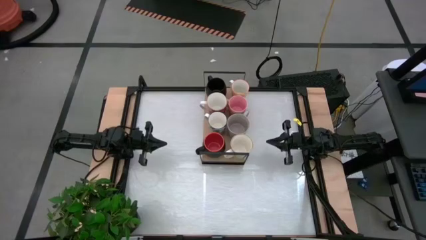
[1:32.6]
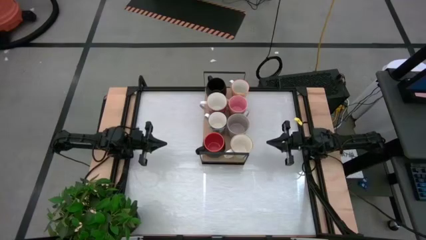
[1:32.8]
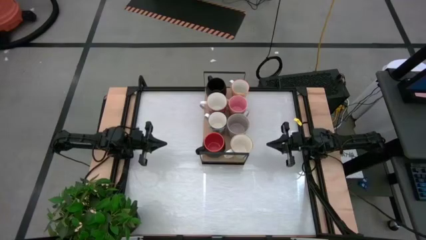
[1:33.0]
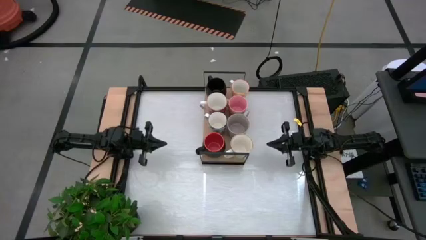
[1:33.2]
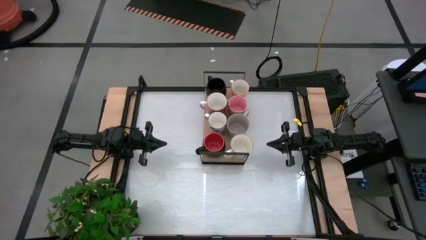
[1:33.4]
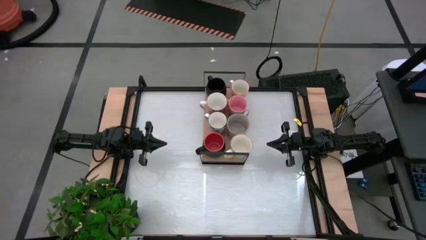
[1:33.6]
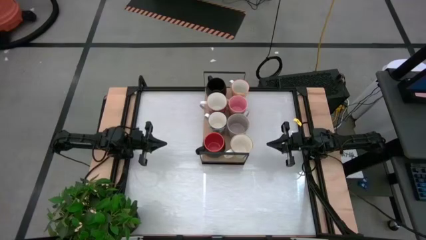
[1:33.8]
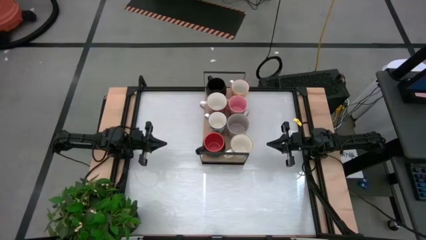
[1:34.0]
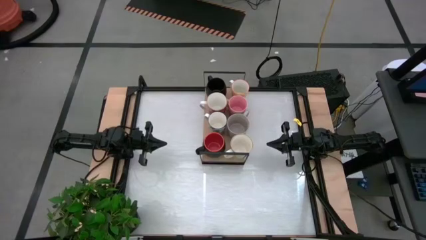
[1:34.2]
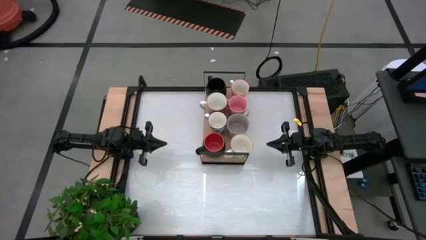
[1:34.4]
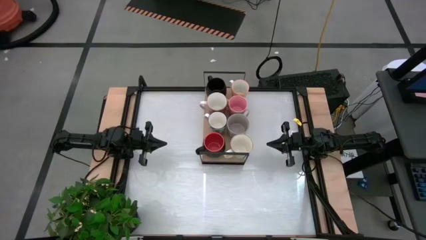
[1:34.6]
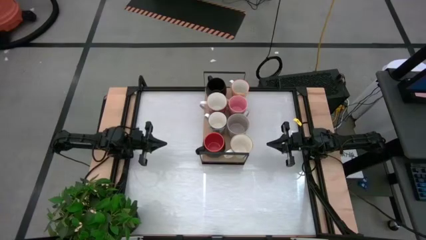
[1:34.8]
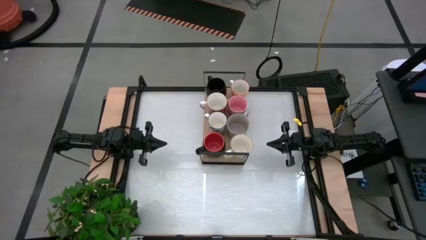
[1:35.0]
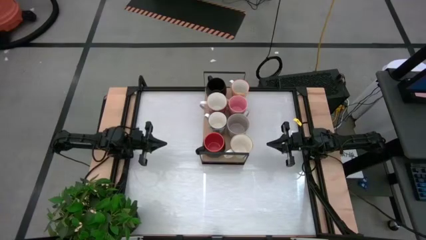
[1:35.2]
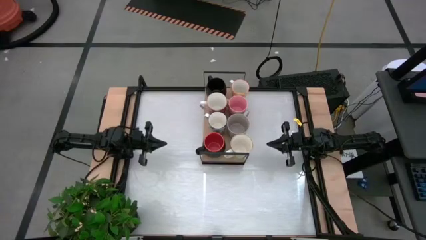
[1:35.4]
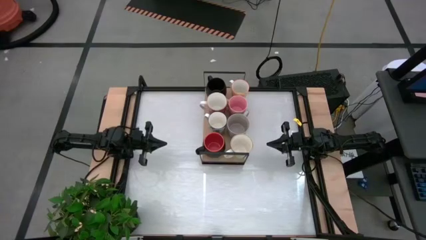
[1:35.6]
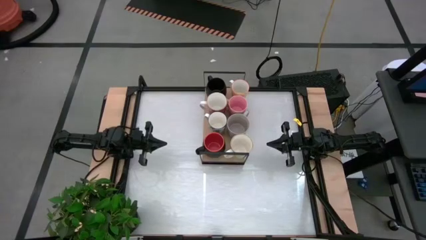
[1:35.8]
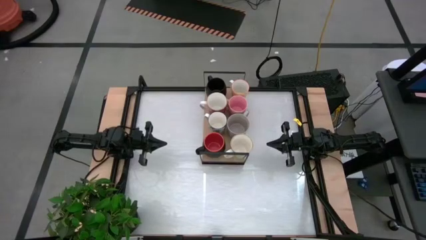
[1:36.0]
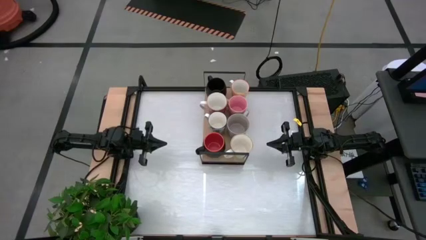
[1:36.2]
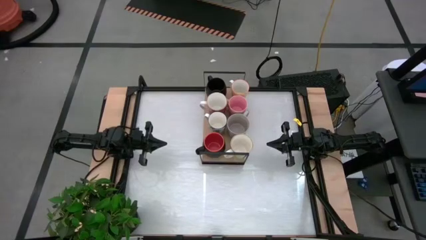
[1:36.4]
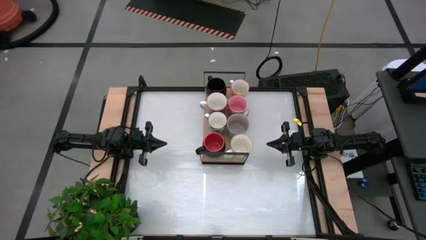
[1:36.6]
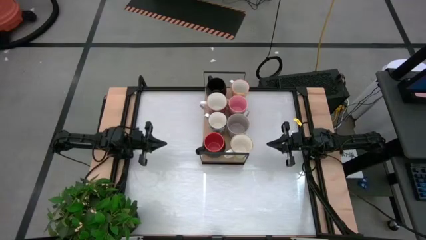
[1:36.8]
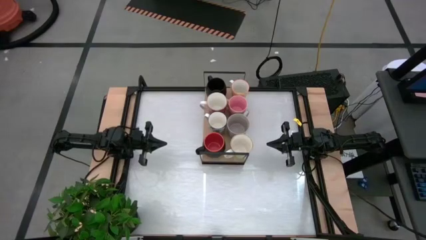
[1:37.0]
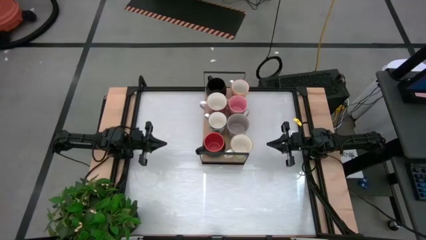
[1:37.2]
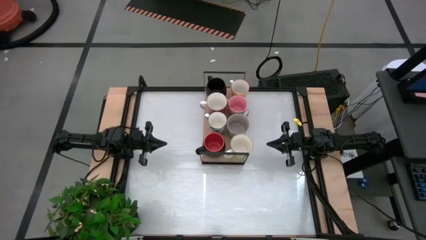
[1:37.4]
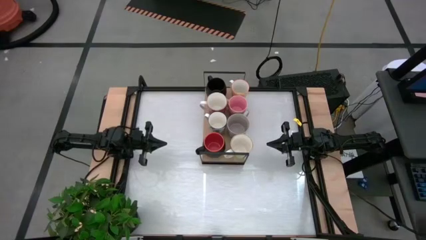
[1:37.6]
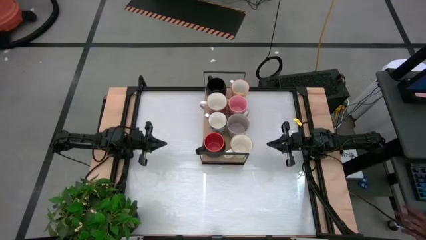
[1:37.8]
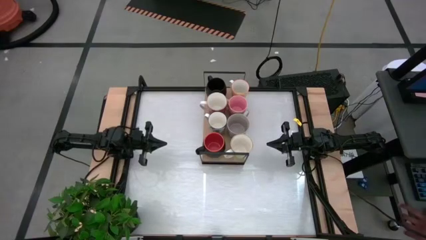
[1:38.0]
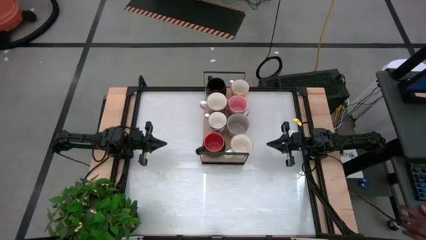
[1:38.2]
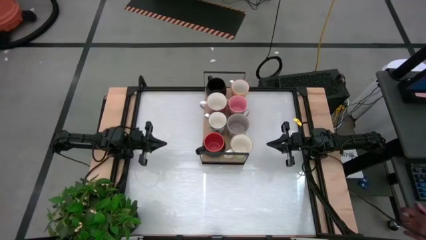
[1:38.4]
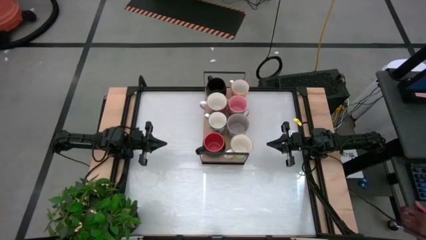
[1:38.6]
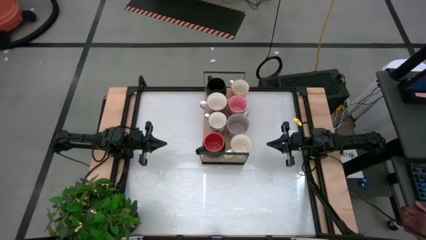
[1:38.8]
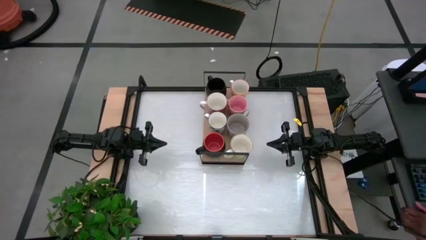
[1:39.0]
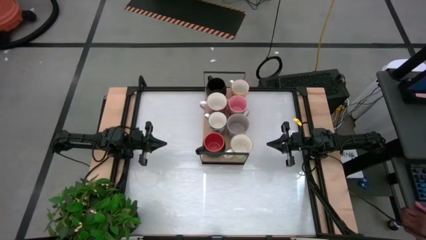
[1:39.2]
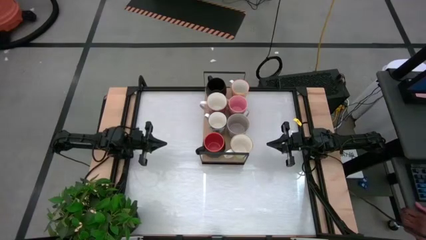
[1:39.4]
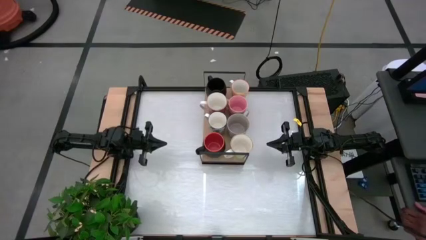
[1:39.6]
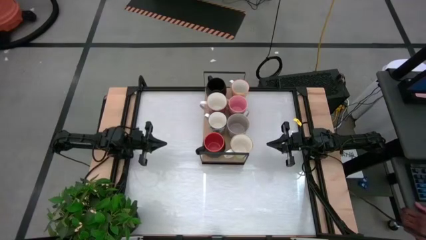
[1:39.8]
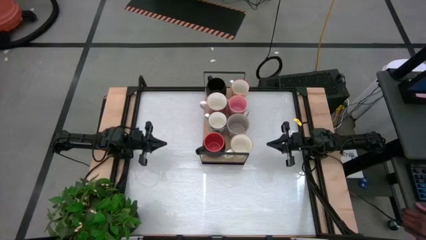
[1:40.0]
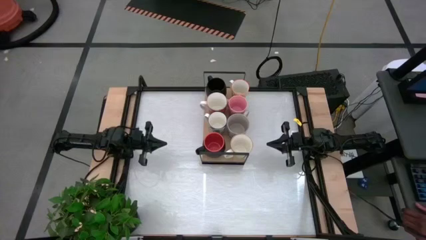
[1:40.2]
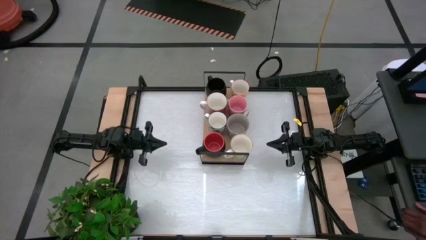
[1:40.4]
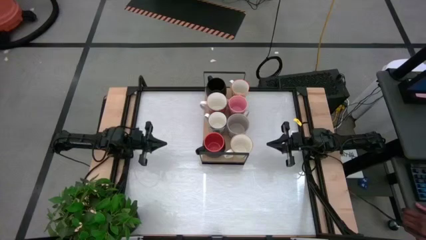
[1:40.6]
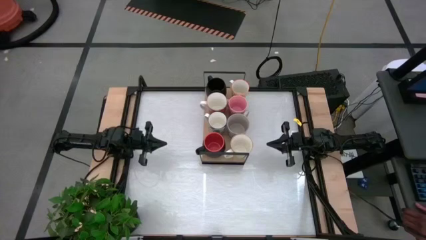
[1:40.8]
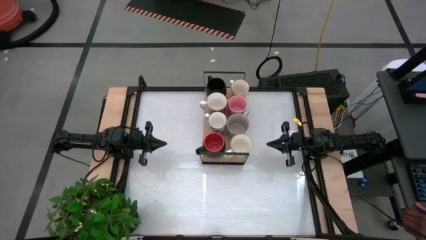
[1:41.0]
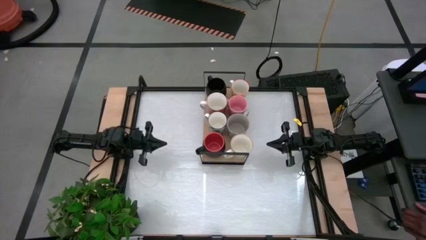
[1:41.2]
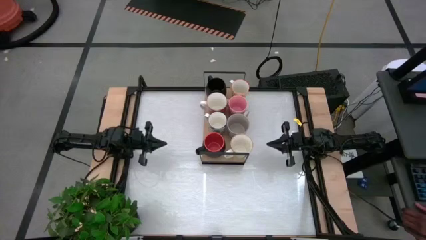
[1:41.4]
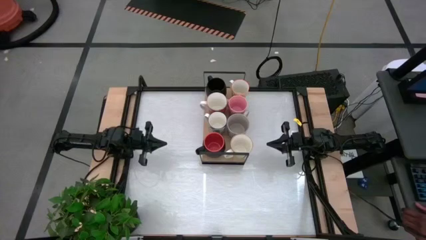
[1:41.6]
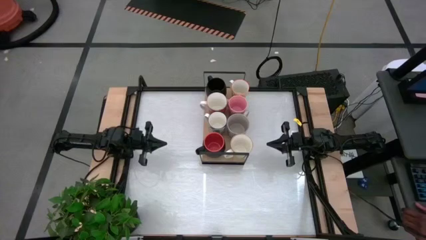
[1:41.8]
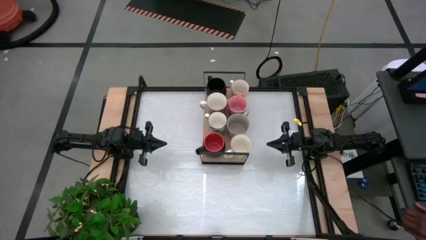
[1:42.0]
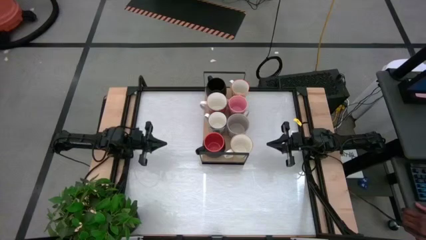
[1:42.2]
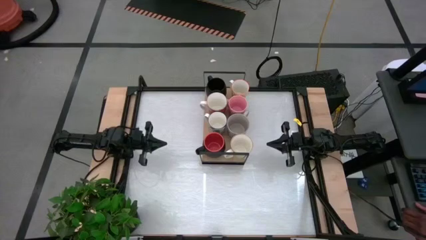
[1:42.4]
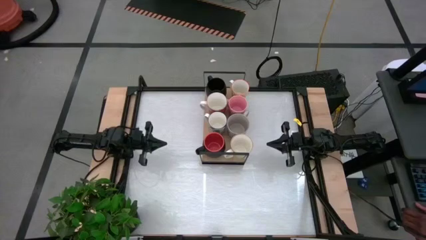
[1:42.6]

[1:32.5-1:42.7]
Task: Place coffee mugs
Return to Home Position

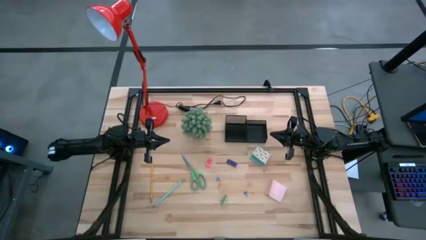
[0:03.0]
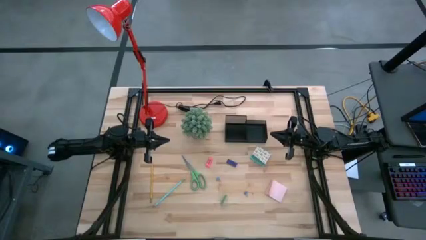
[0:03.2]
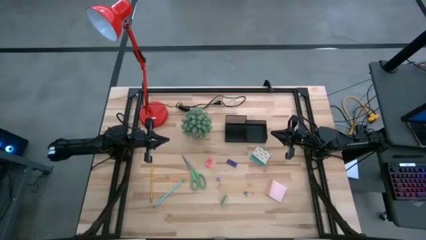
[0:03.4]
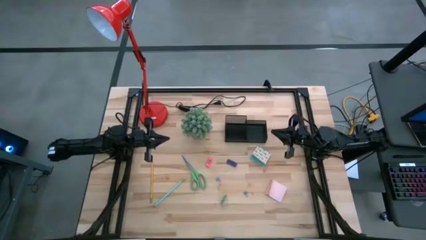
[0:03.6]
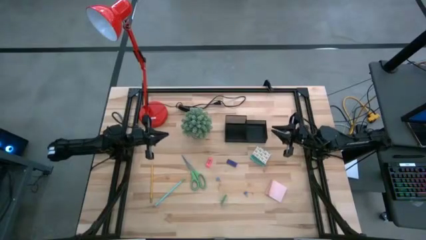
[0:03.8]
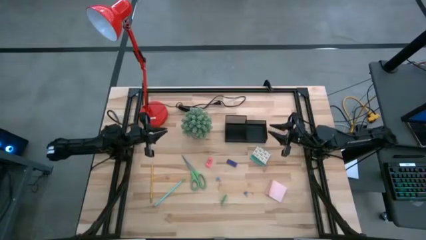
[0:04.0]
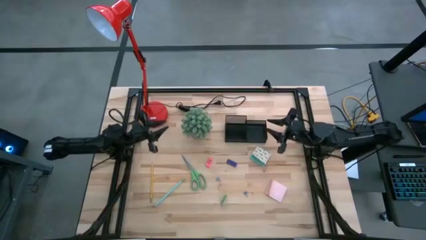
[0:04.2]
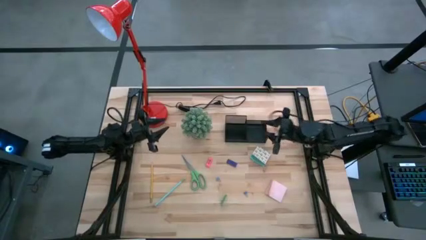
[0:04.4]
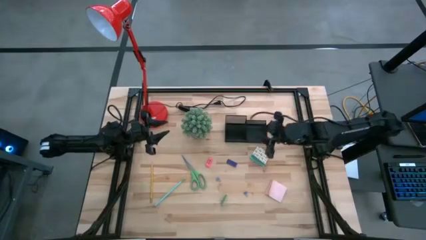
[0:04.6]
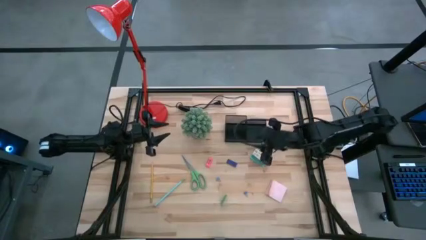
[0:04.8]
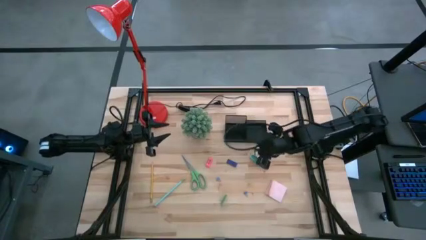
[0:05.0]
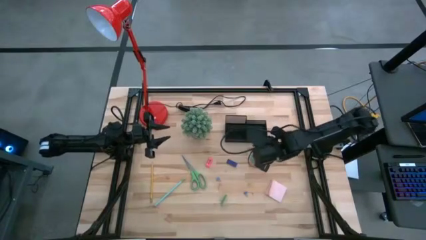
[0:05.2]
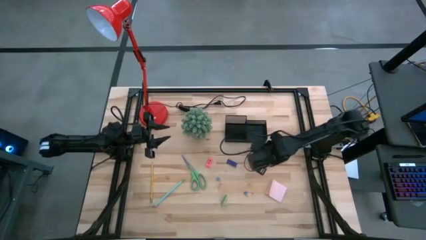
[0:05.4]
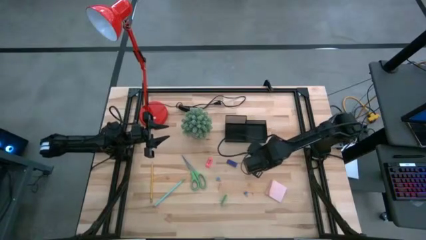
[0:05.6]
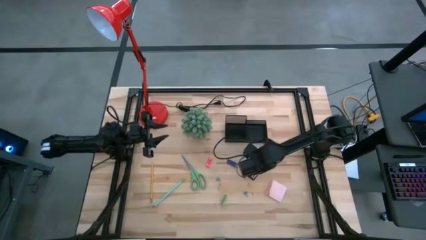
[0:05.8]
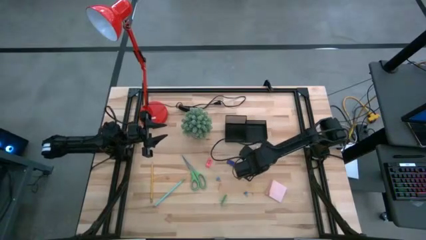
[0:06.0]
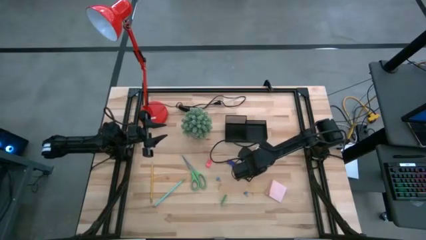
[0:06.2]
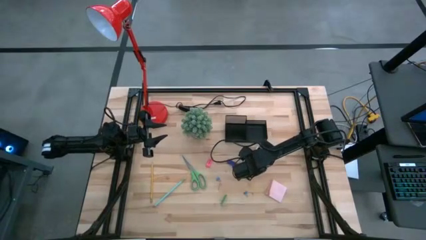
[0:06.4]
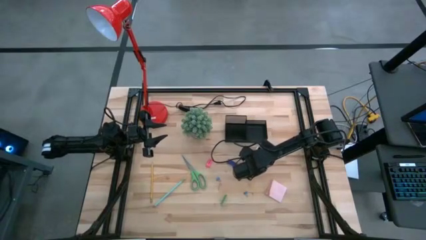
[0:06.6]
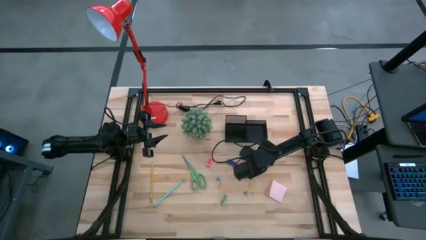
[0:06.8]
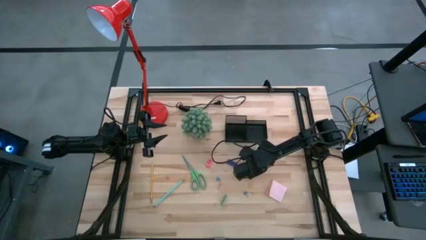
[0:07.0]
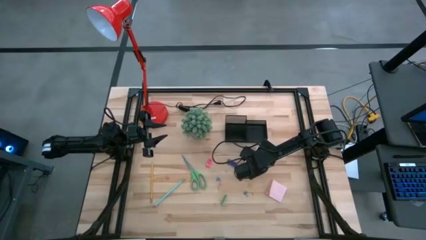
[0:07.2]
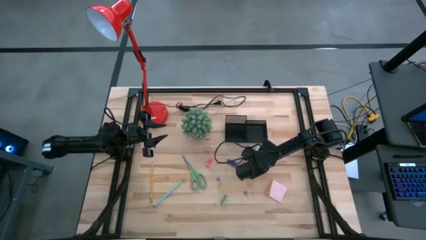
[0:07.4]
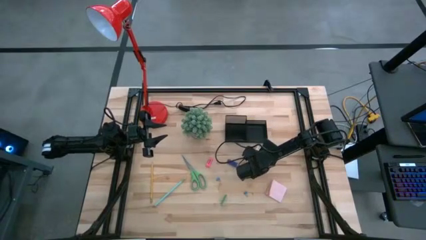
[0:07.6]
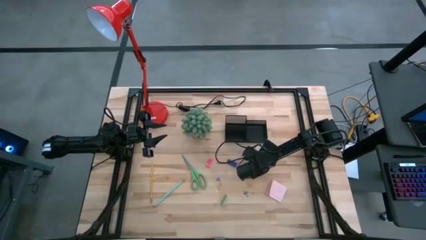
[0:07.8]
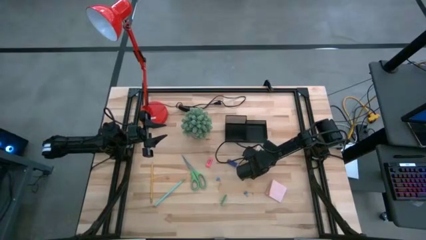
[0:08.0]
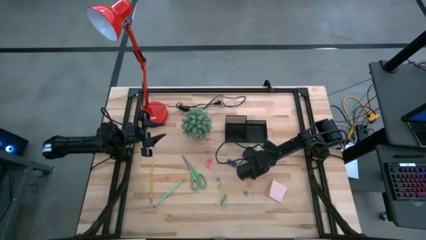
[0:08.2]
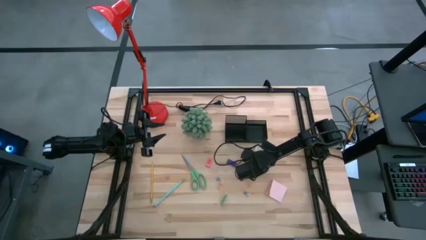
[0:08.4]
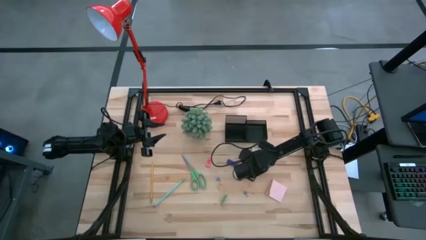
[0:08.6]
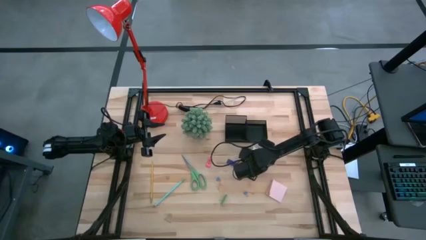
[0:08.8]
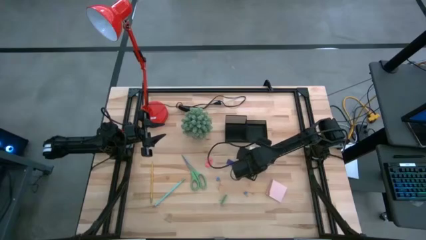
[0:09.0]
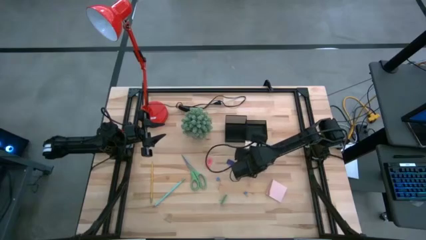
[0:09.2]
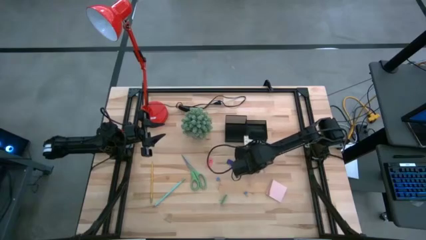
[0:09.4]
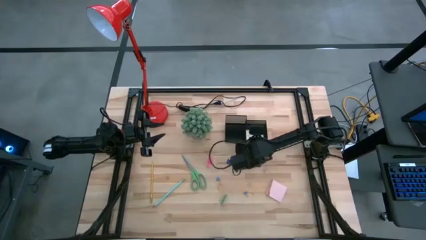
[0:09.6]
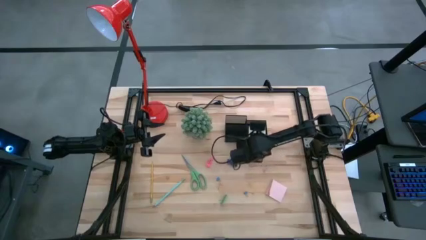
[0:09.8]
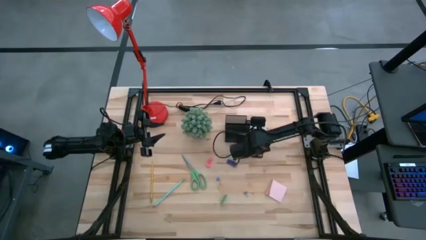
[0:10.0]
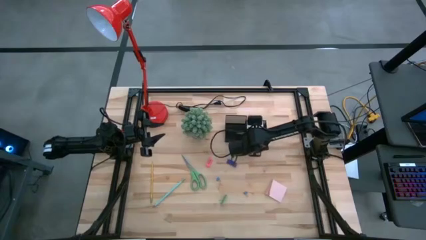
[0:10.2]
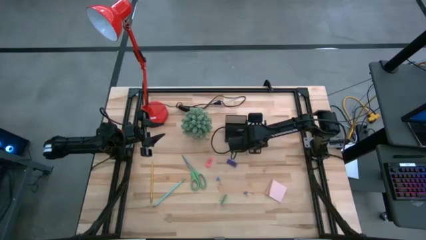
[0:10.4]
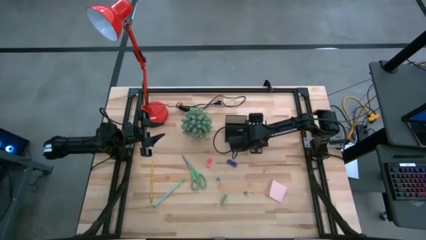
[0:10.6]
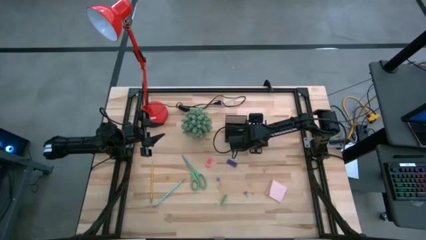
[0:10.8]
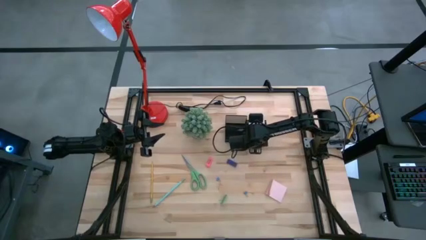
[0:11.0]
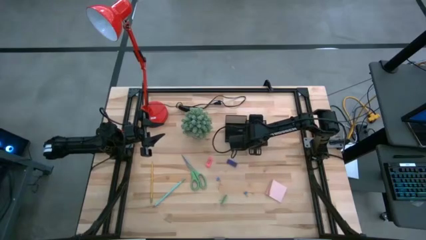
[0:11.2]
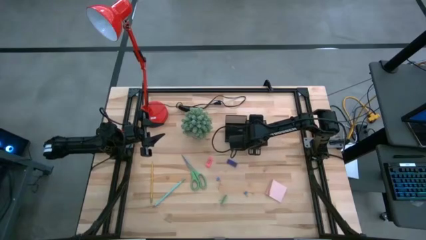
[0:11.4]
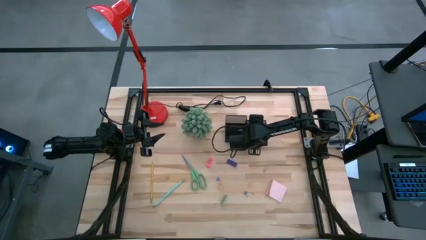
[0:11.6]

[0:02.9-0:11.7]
Task: Pick and place office supplies into organizer
Put the green sticky notes into the black desk organizer
